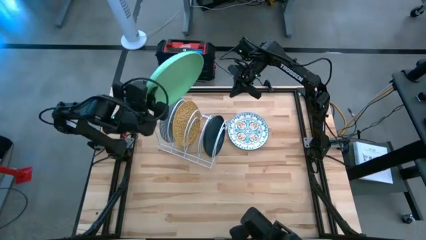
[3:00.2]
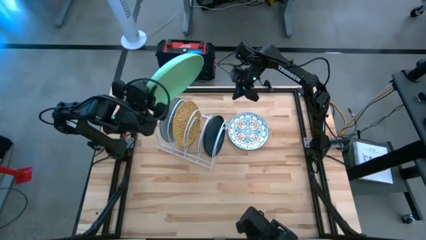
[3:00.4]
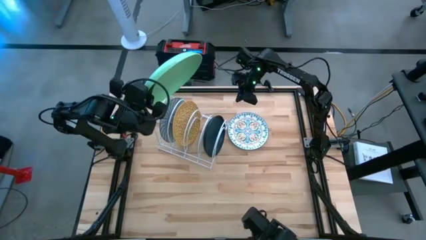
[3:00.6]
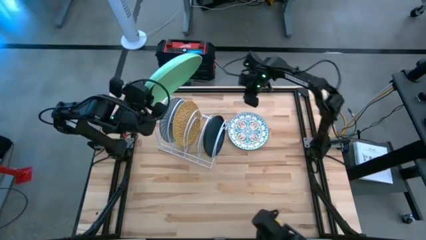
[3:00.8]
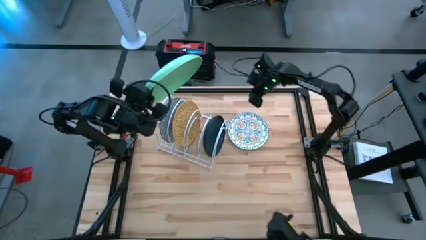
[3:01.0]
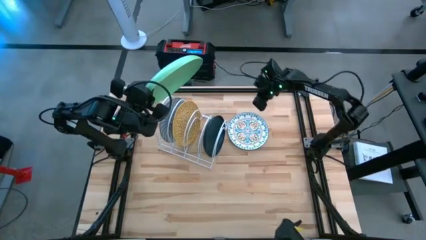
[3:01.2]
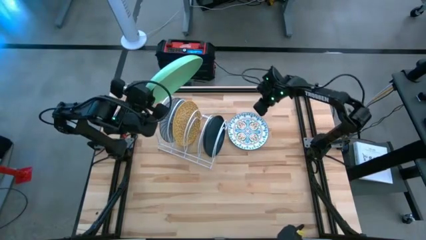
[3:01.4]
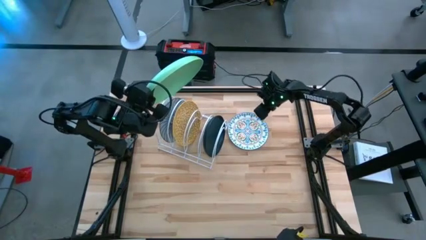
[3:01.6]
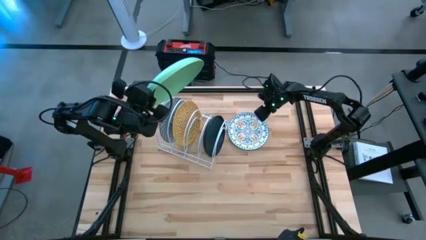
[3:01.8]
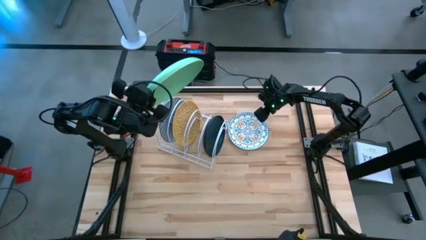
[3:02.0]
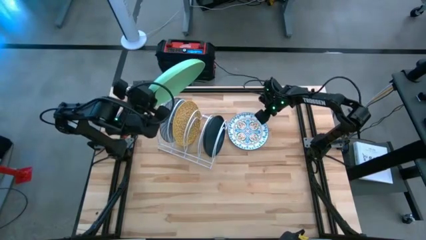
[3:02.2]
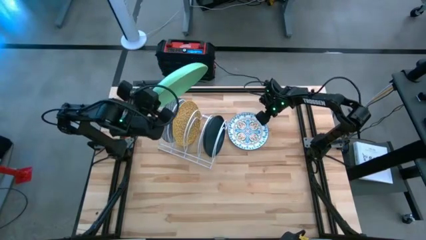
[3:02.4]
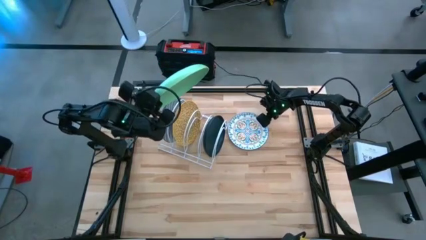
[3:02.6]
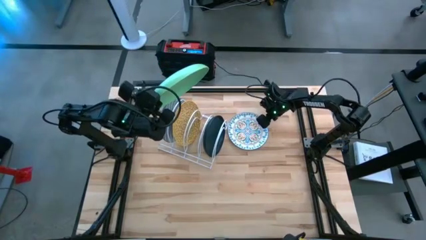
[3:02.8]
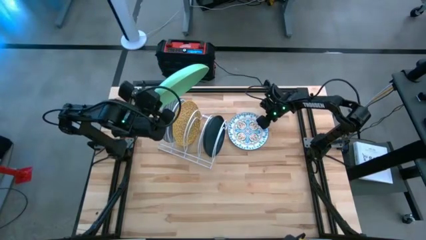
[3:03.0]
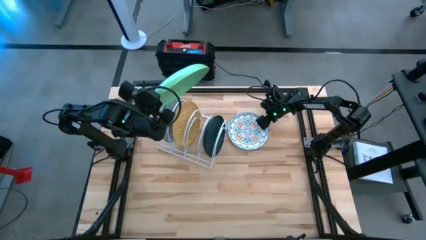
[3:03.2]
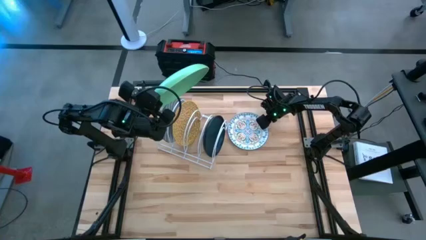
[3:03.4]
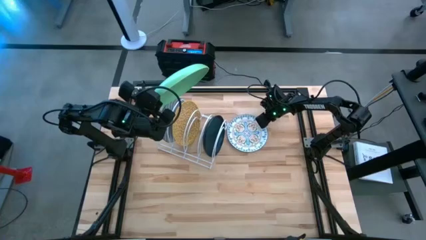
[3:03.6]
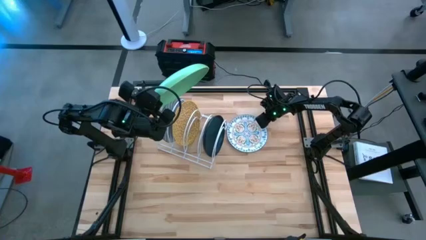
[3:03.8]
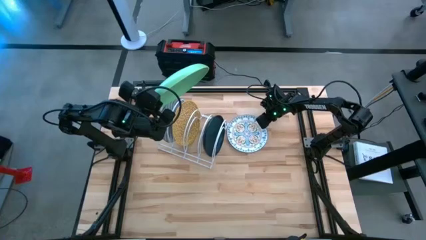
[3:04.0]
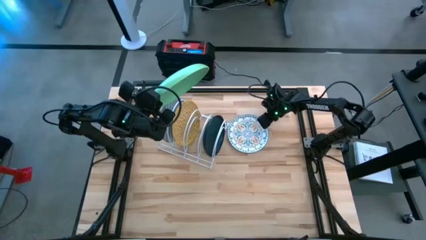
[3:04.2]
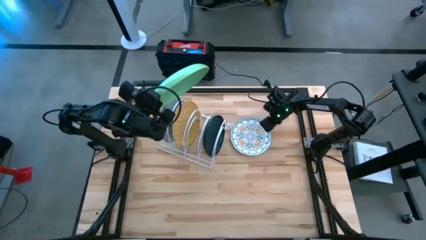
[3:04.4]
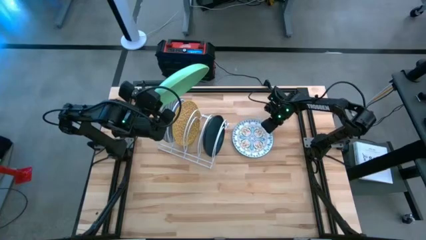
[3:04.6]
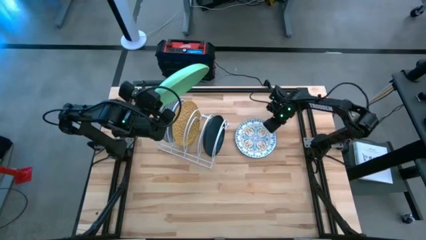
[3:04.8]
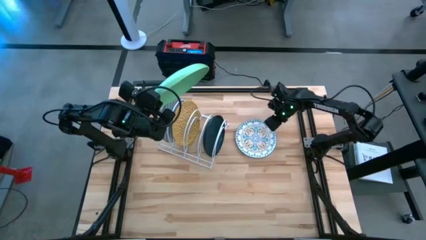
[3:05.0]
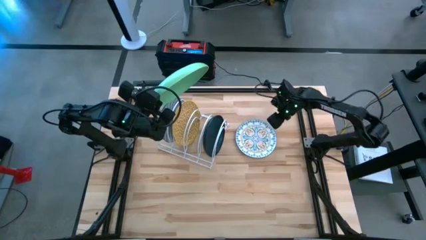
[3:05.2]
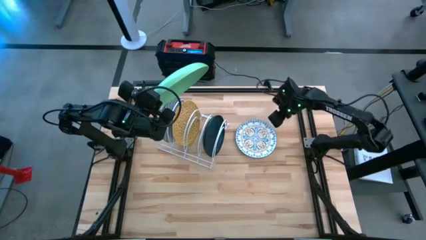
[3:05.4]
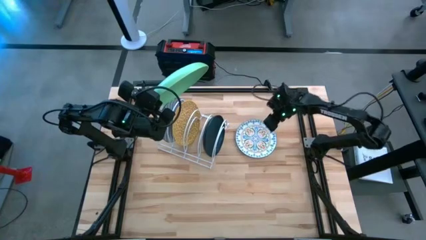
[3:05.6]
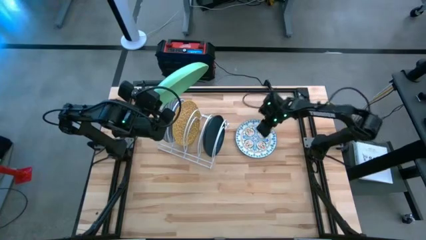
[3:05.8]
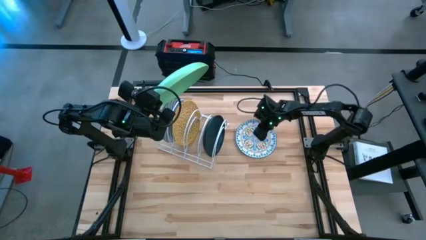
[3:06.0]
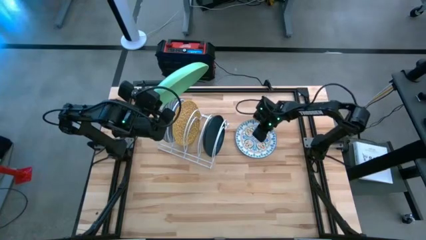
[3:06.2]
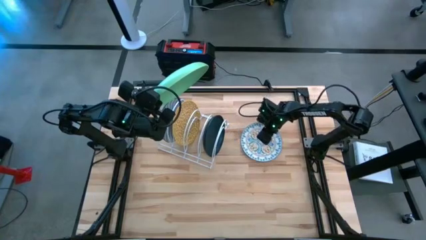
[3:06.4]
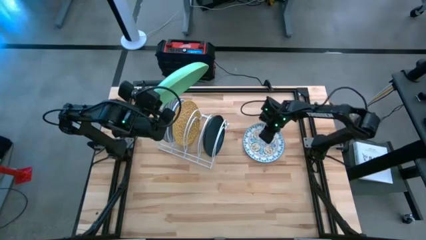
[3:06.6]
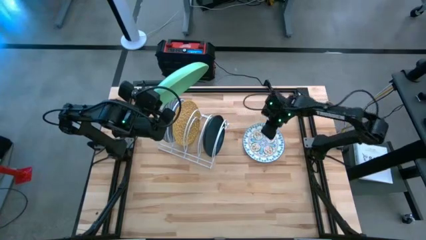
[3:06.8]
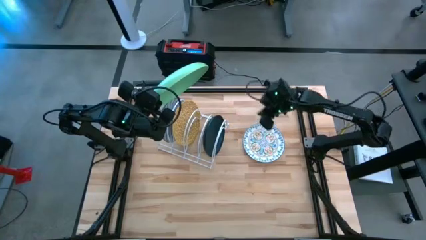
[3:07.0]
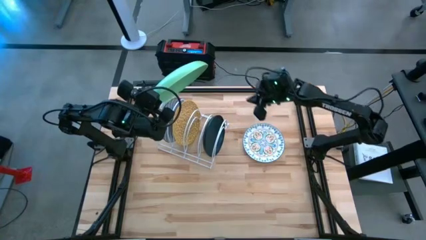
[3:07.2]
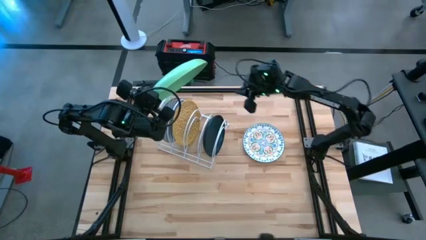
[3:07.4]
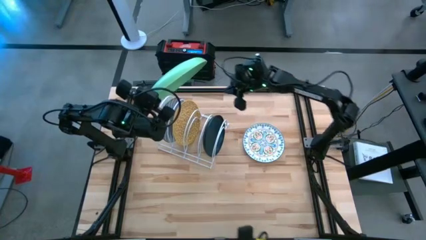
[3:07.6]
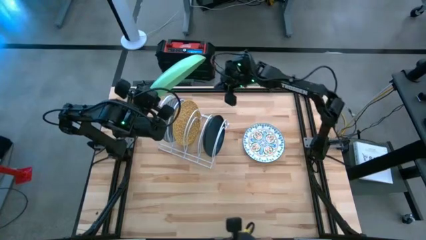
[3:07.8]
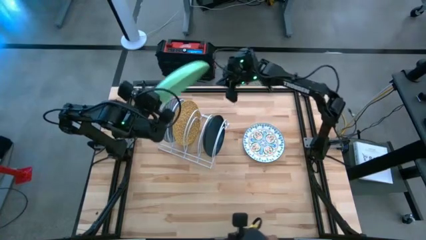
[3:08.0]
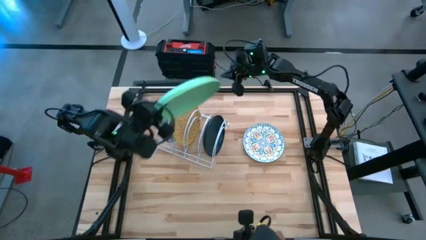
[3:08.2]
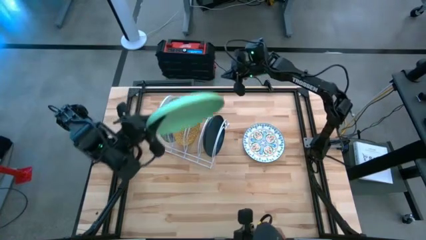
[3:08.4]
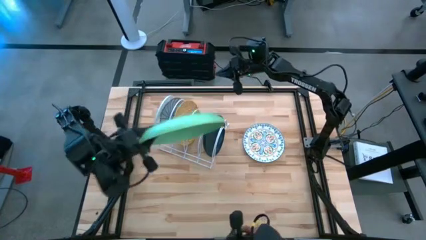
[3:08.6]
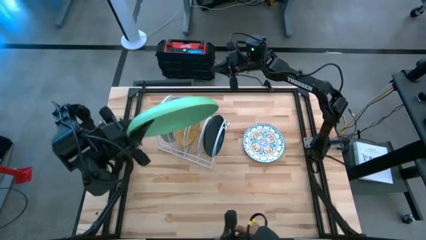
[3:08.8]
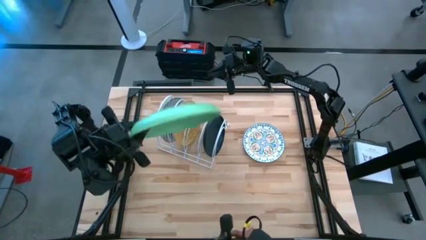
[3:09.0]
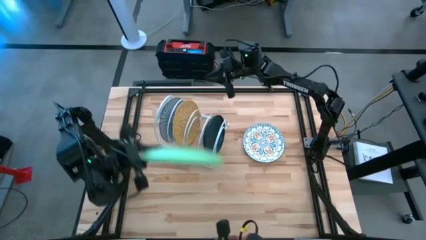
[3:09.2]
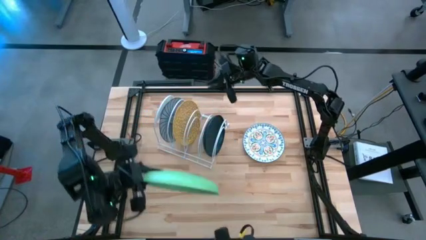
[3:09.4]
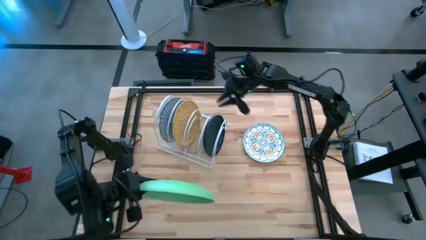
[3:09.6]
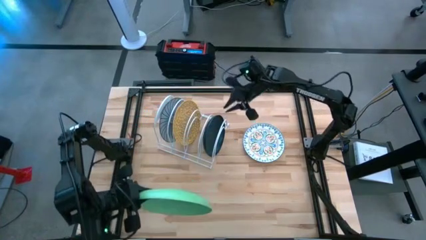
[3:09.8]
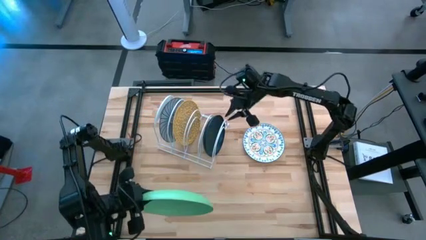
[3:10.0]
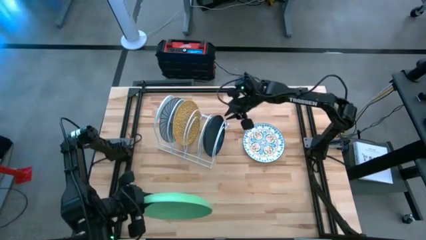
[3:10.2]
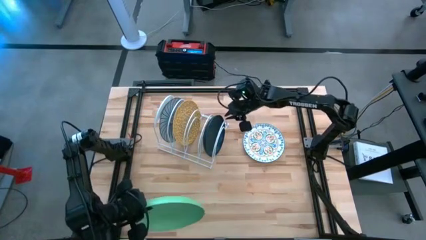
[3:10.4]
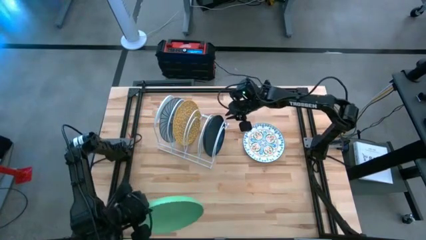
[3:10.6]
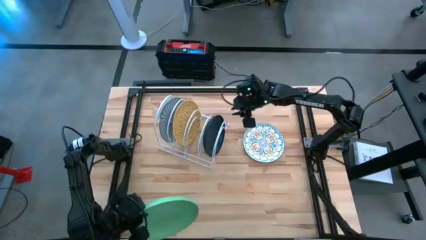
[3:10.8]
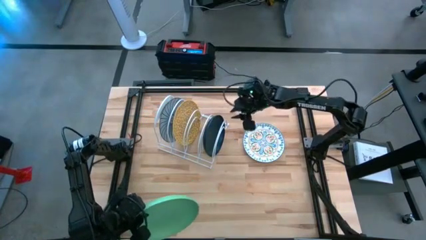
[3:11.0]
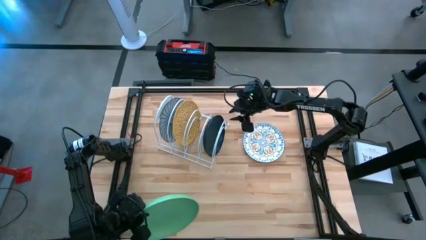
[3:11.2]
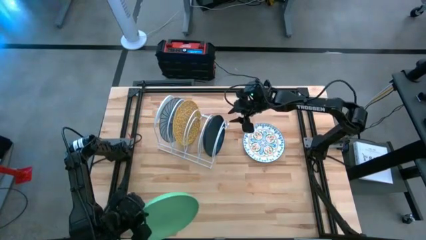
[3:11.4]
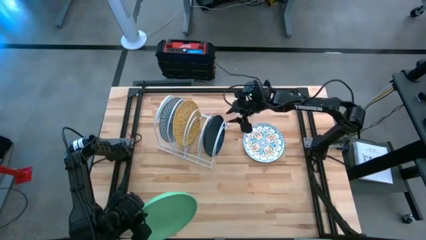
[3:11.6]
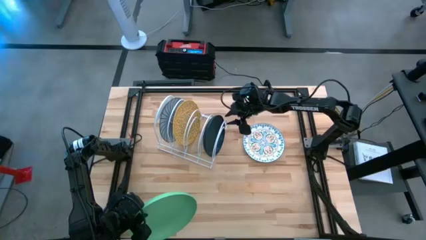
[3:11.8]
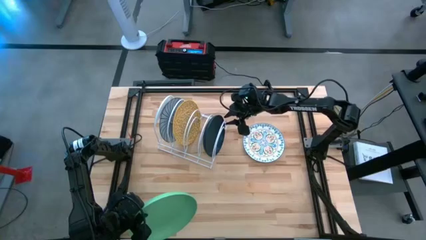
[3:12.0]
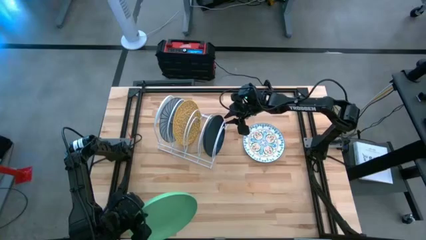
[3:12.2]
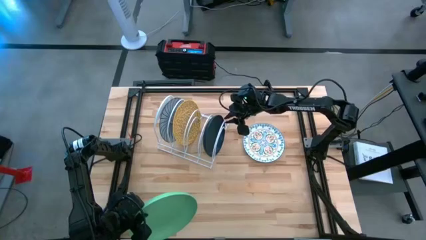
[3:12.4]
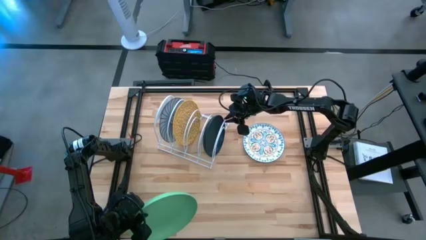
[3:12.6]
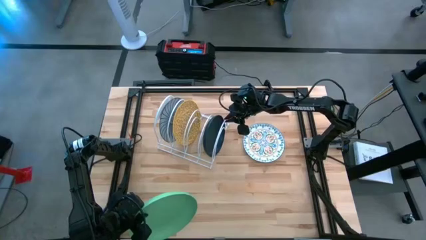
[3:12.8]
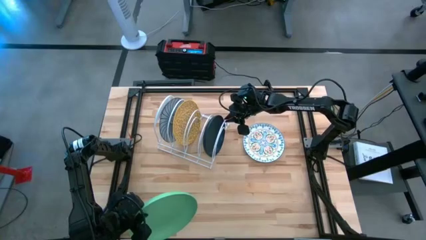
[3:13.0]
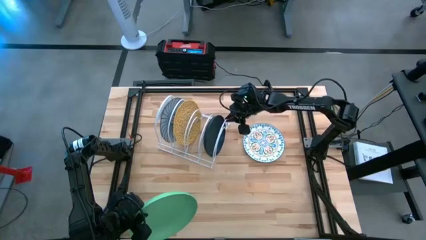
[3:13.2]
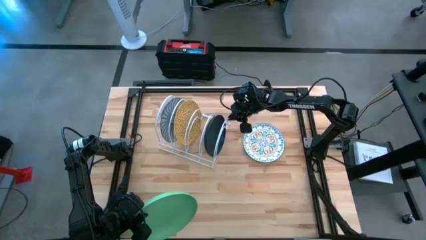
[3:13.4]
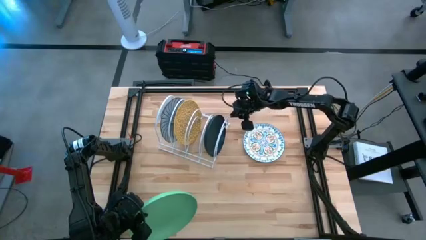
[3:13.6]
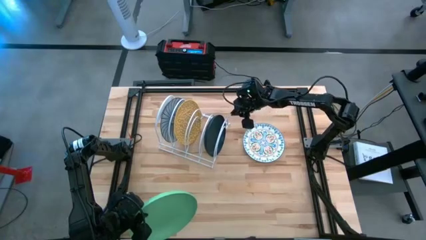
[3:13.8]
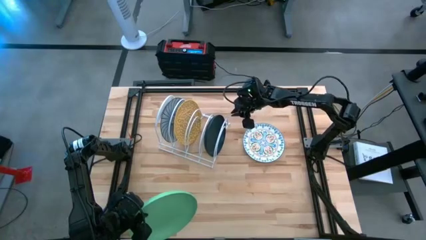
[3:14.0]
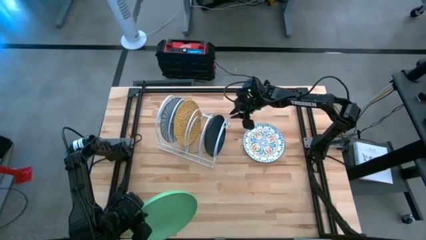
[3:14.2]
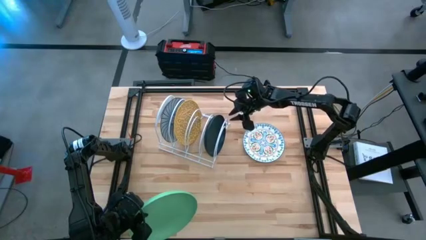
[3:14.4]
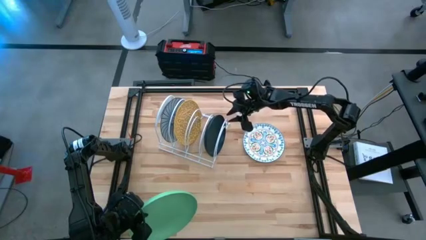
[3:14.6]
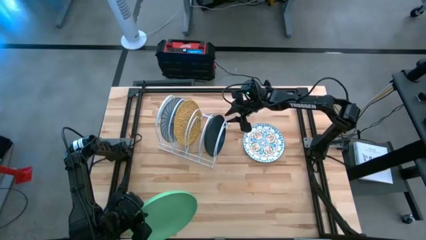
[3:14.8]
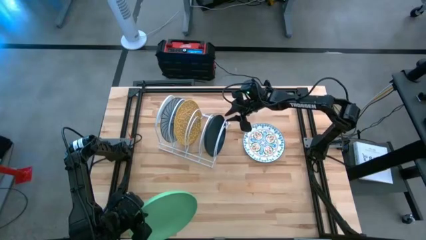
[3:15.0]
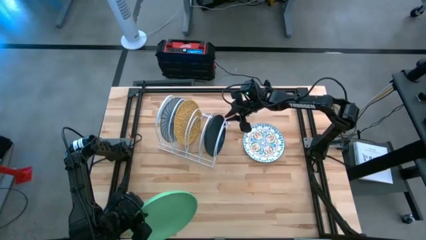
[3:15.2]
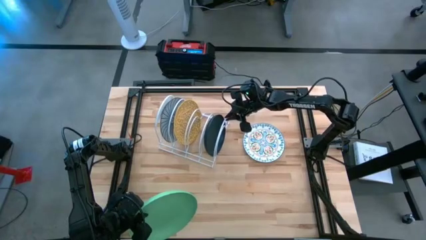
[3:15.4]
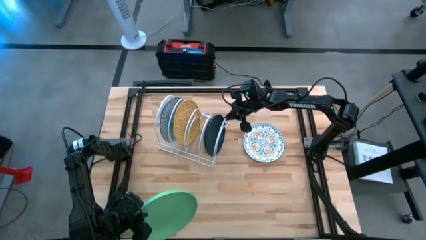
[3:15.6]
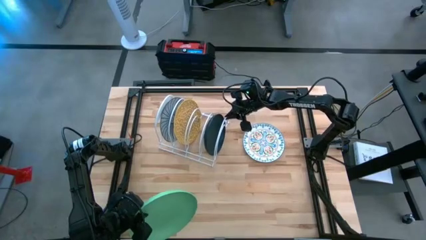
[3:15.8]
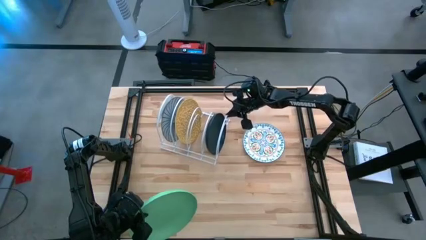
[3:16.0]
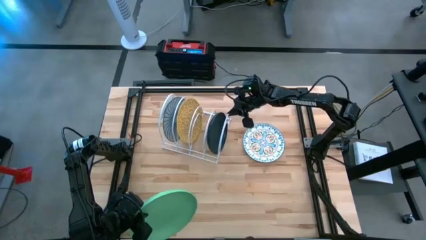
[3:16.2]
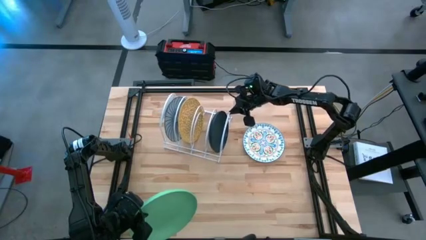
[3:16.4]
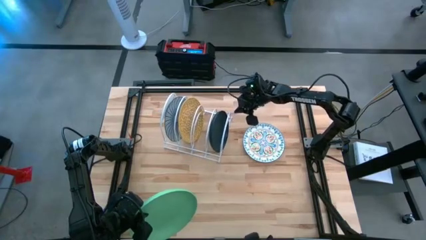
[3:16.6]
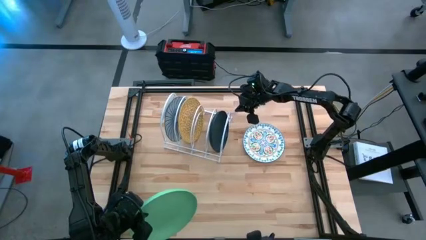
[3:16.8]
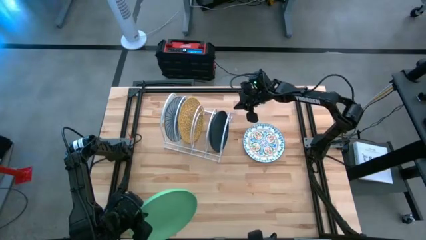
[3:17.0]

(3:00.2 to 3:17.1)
Task: Sort dishes
Put the green plate in the dish rack
